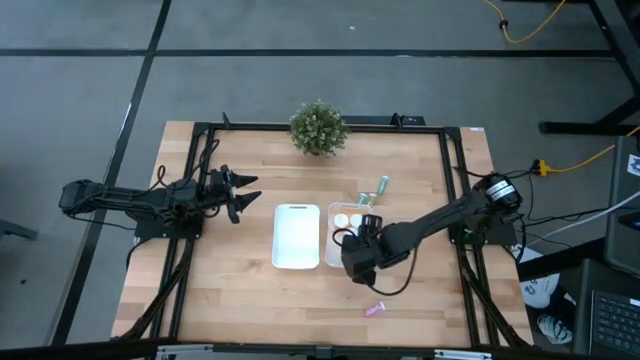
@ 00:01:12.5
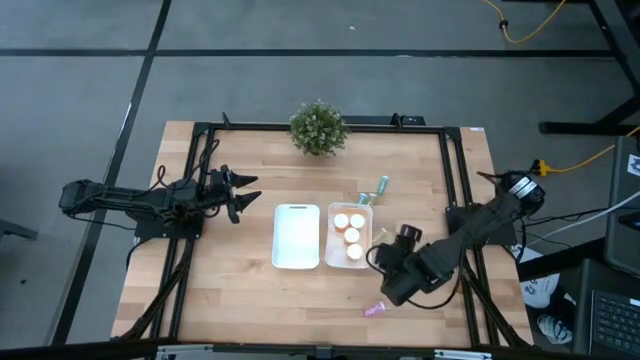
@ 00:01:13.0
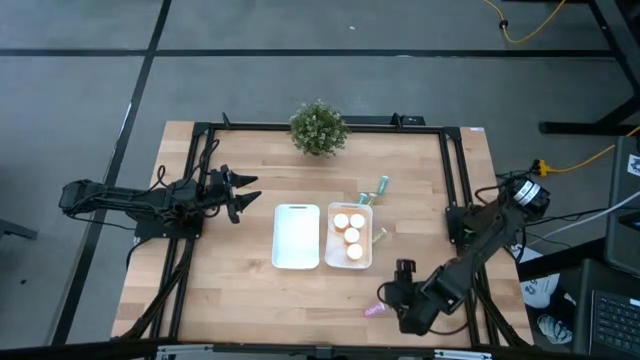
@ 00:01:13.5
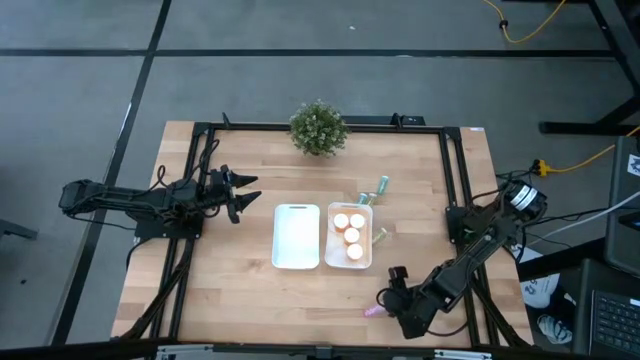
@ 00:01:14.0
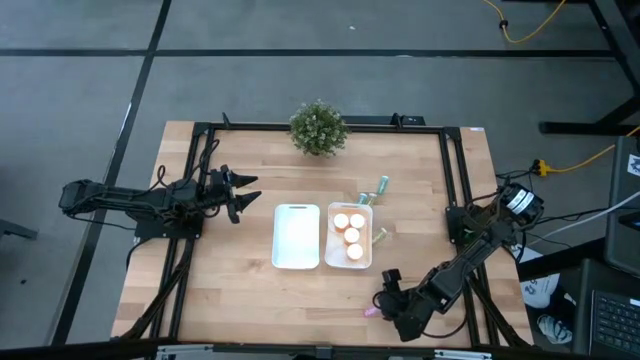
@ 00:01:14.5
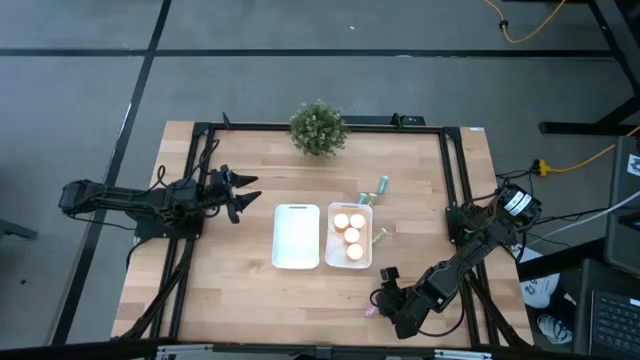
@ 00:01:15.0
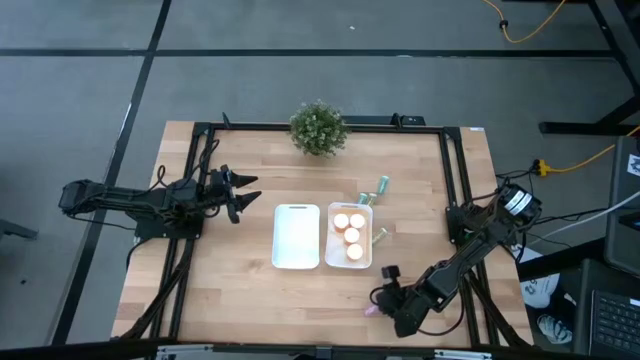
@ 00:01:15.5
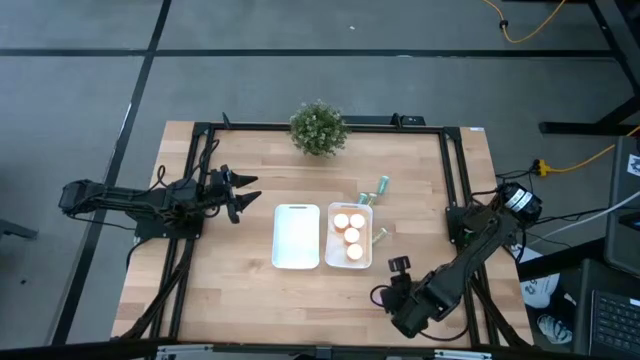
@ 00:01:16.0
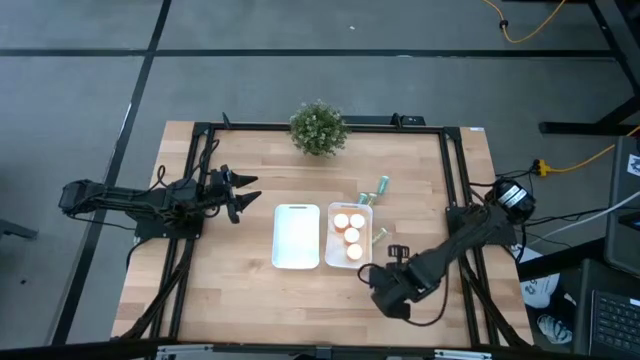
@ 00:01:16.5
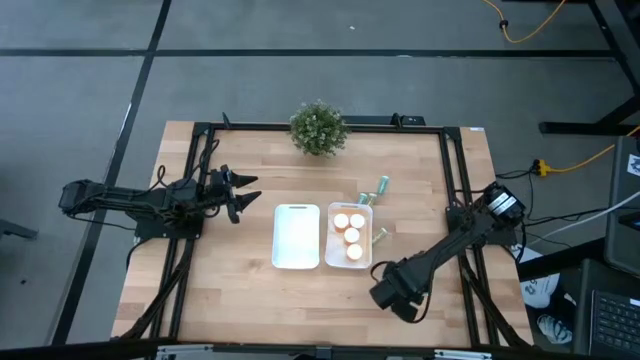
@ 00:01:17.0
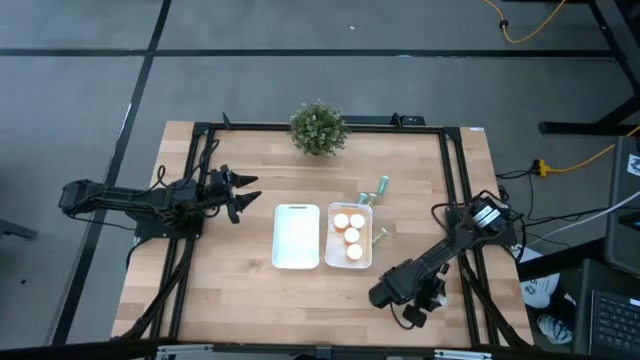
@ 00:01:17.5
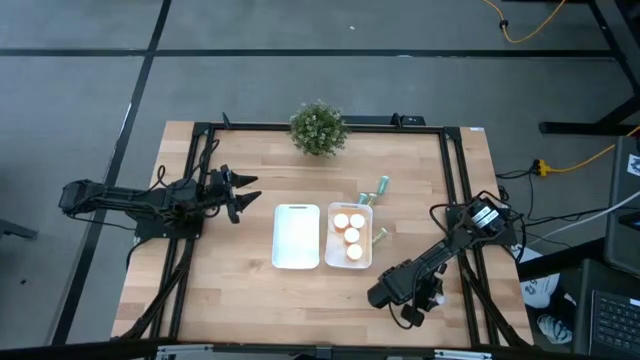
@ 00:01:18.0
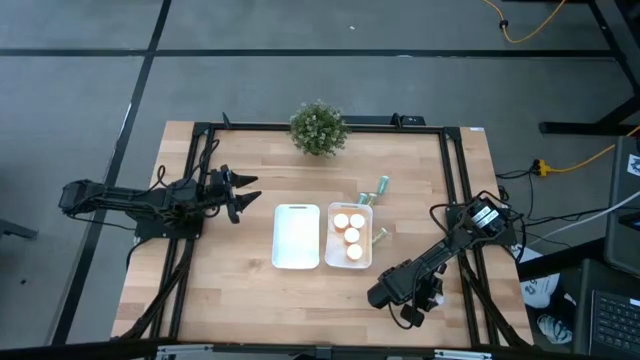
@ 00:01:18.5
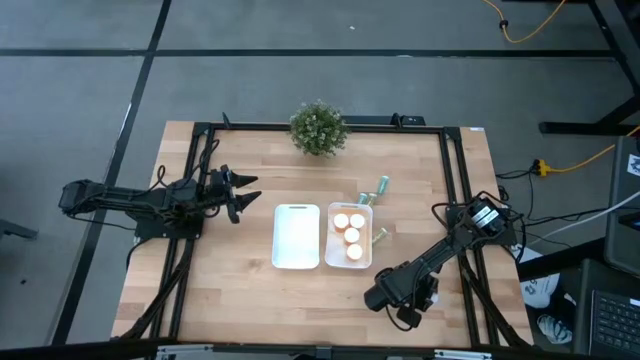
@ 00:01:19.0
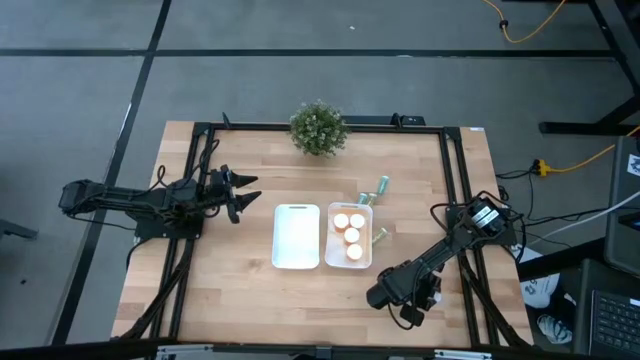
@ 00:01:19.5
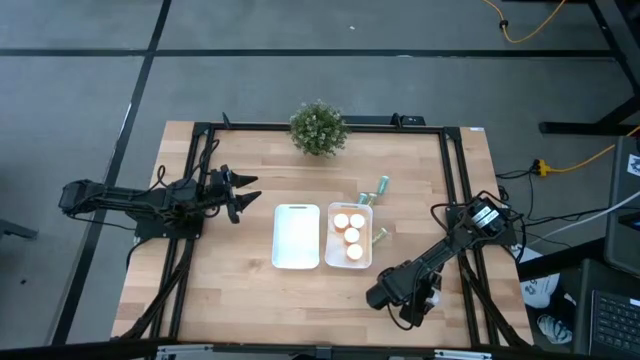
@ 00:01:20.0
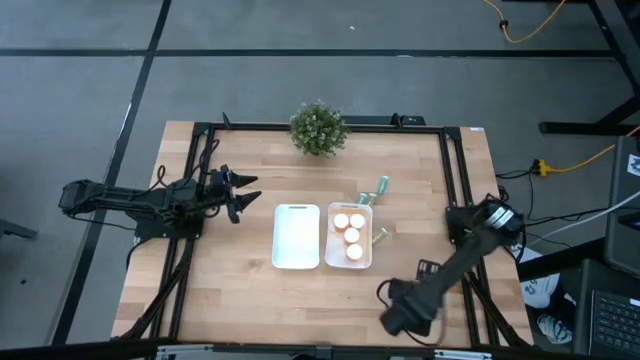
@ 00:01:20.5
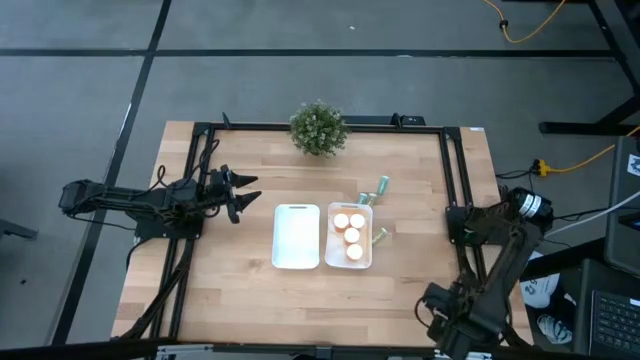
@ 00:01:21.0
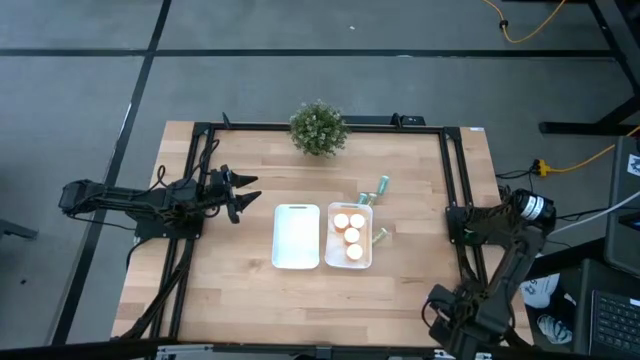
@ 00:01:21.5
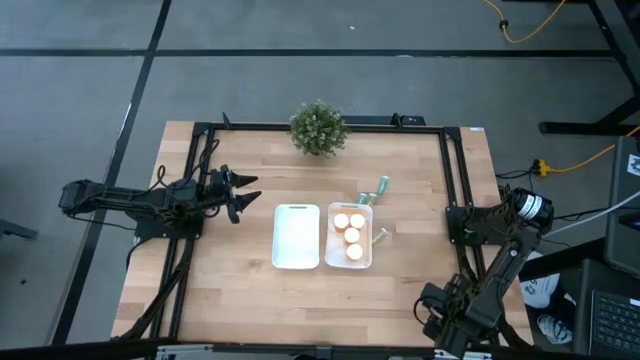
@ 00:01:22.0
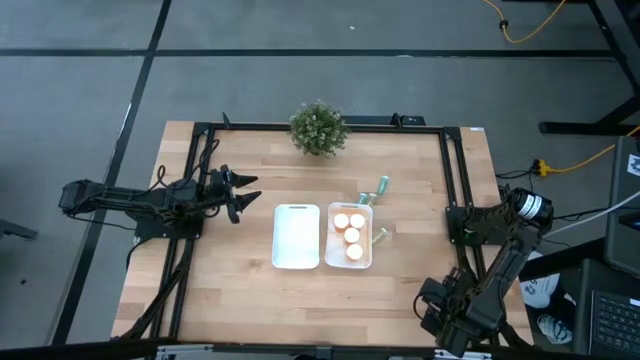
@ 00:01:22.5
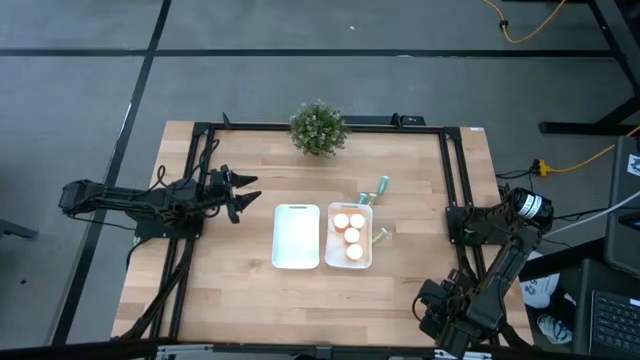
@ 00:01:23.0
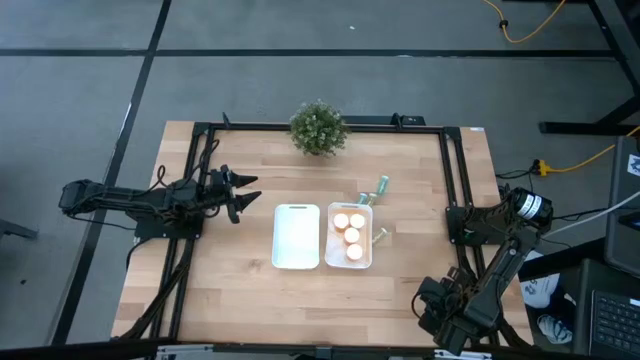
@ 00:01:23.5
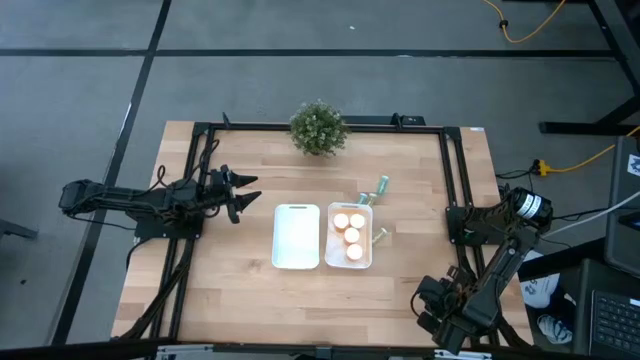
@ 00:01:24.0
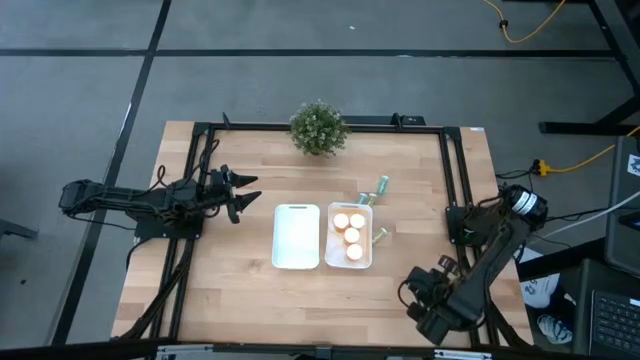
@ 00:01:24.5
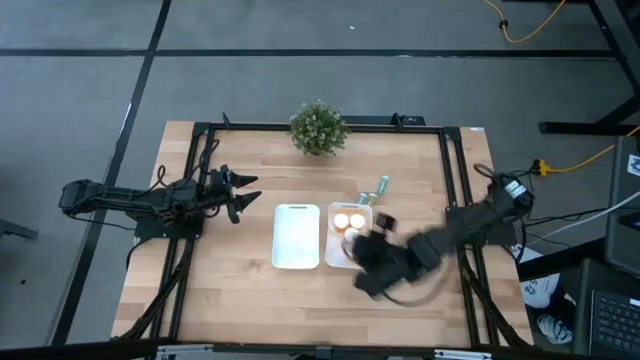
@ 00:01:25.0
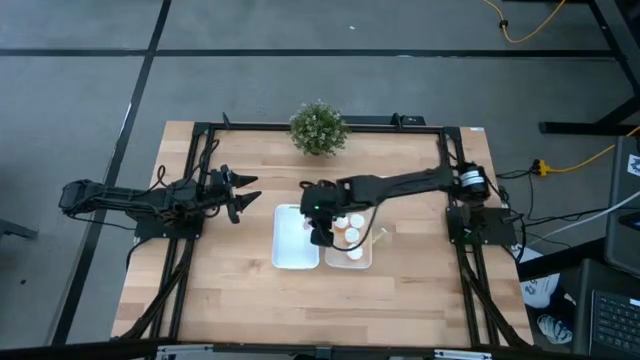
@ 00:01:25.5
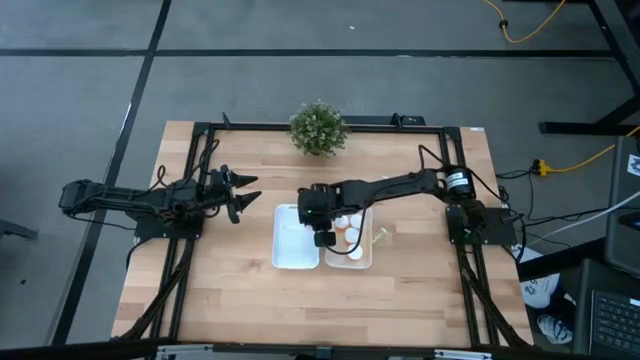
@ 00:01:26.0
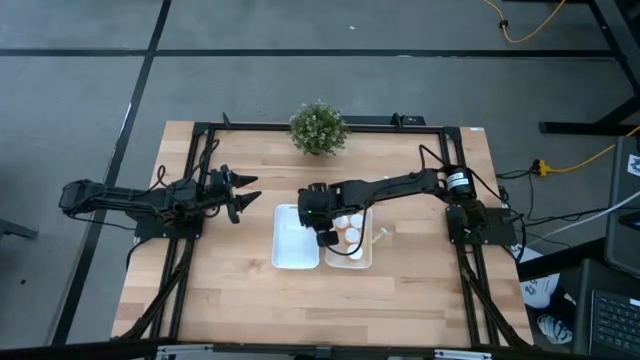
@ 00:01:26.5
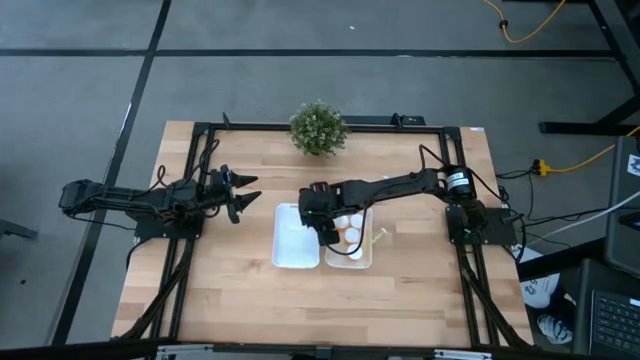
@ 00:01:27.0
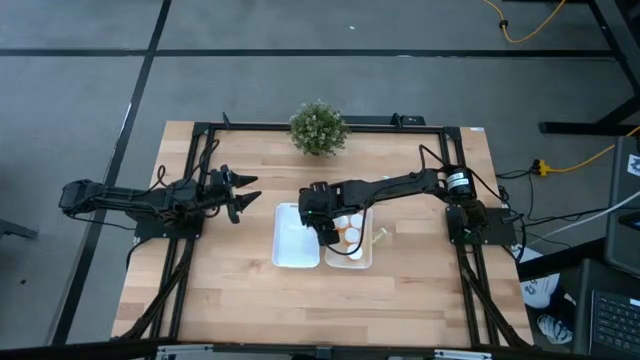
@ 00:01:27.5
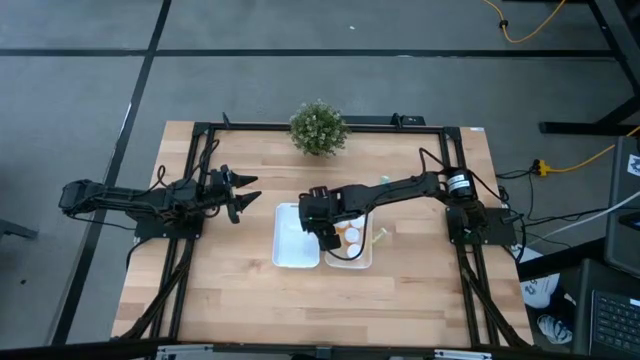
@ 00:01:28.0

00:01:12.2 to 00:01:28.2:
Task: Pick and place medicine bottles into bin by pill shape (circle, oval)
Put the pink tablet bottle into the left white bin

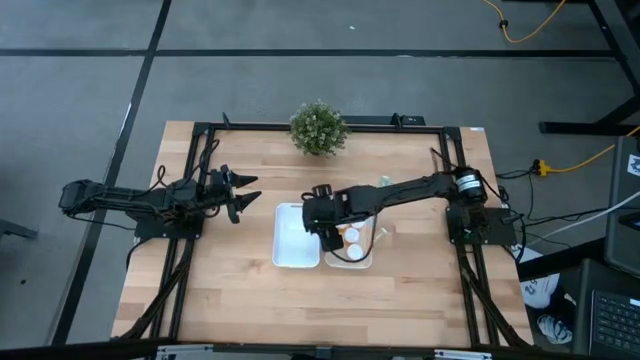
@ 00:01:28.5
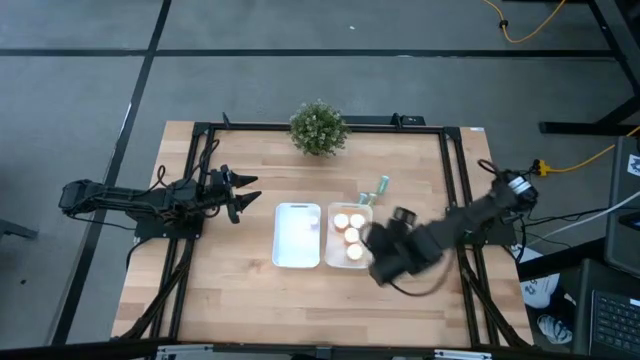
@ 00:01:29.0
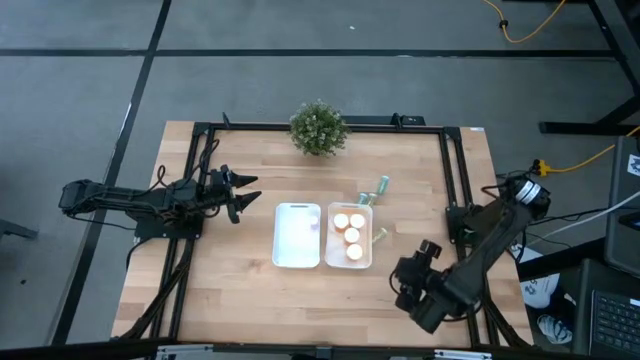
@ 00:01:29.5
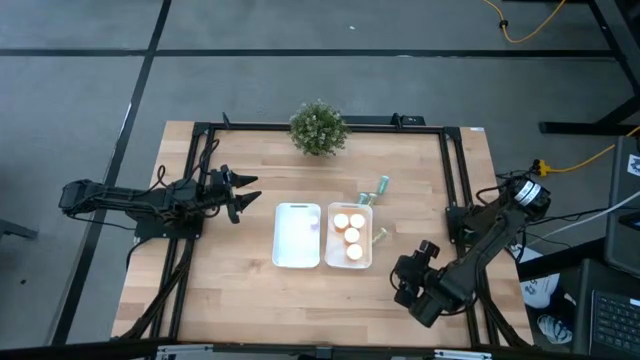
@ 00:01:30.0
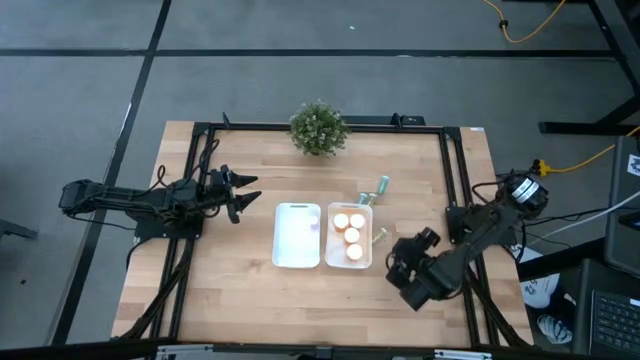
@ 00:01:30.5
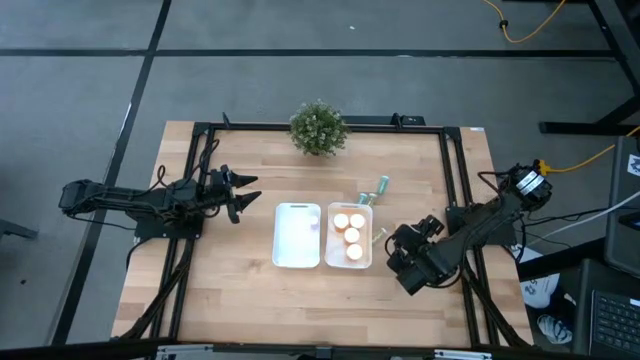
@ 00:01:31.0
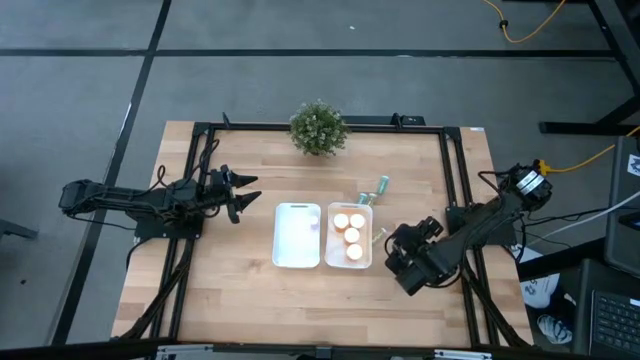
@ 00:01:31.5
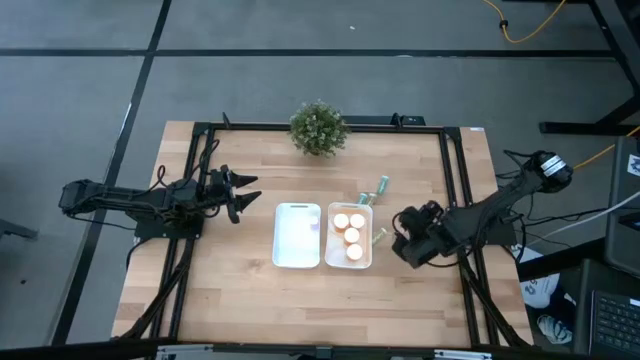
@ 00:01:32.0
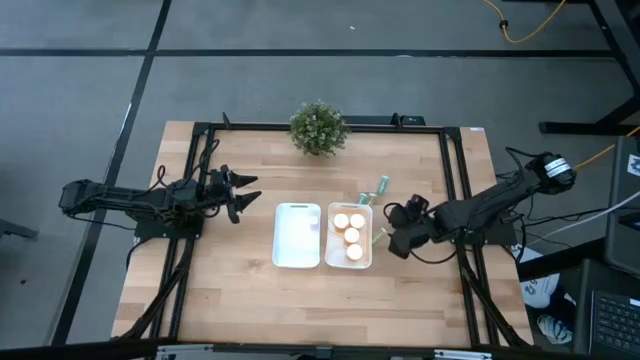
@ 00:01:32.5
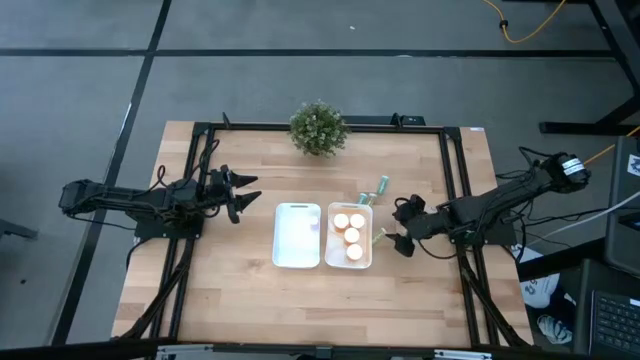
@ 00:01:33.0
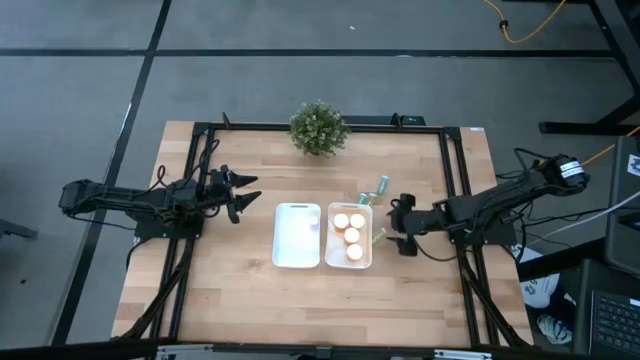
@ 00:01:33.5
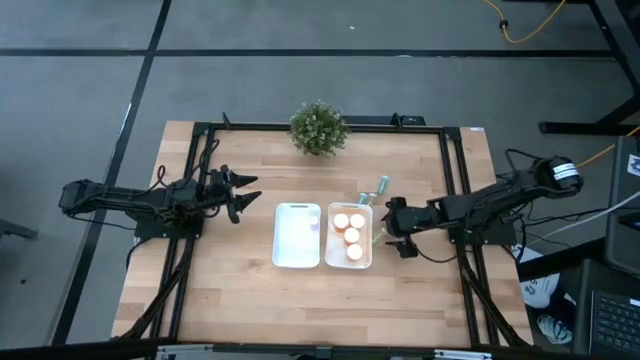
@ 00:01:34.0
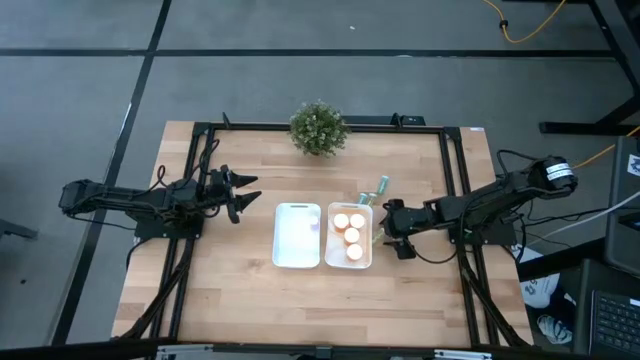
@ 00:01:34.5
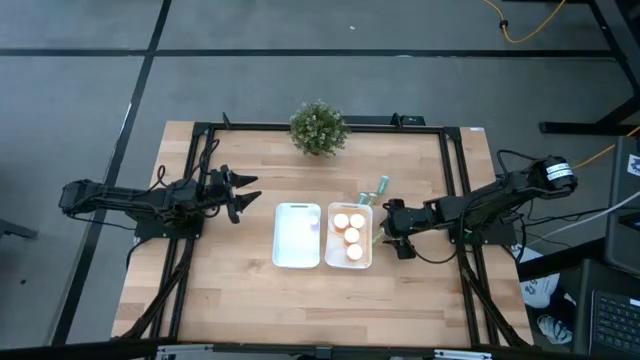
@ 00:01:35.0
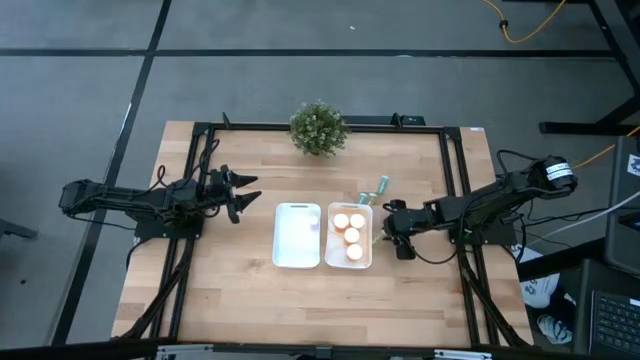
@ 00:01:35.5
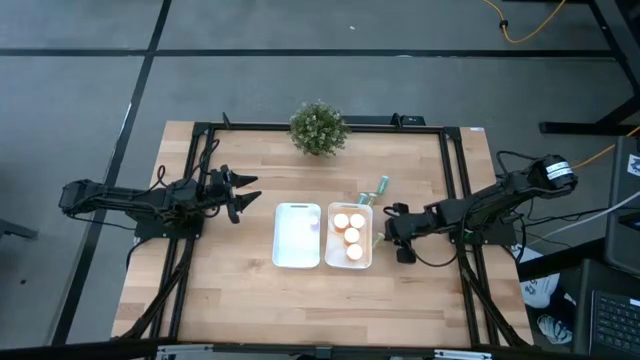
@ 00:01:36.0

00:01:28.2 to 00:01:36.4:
Put the yellow tablet bottle into the left white bin
